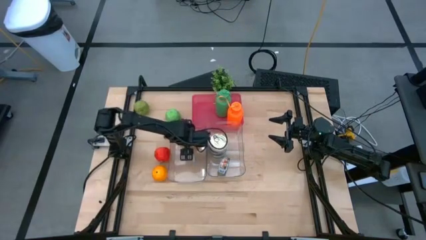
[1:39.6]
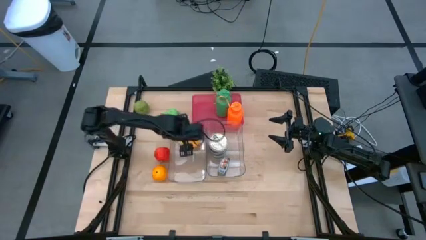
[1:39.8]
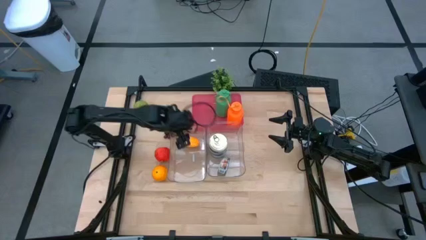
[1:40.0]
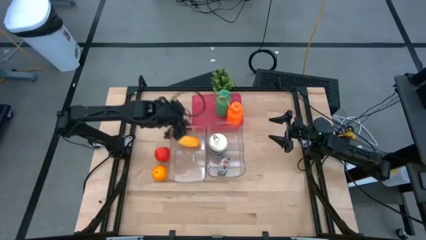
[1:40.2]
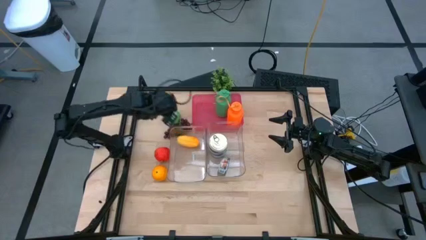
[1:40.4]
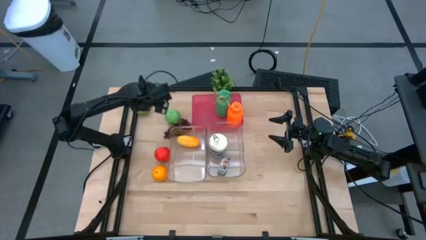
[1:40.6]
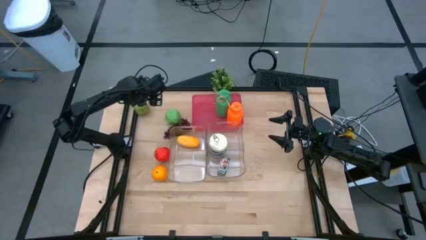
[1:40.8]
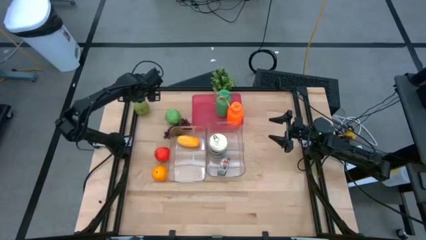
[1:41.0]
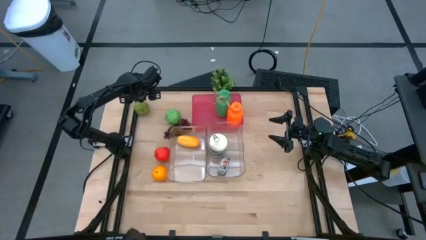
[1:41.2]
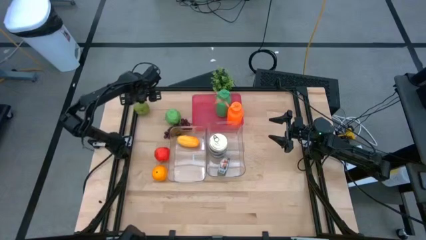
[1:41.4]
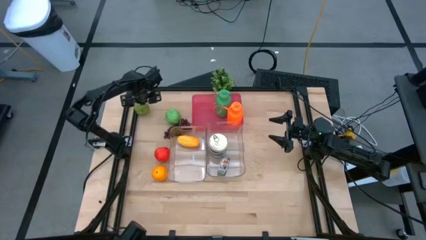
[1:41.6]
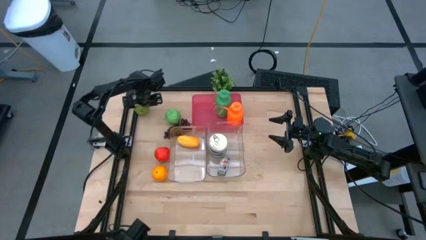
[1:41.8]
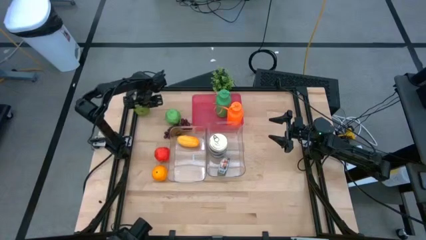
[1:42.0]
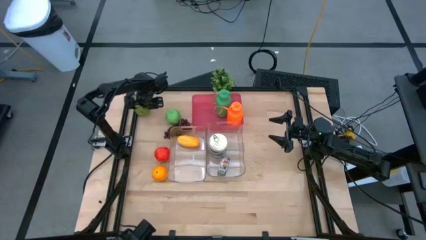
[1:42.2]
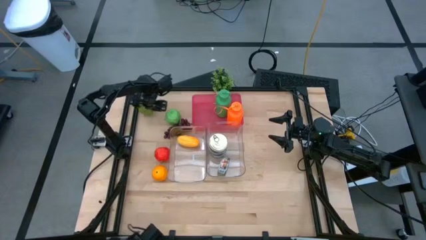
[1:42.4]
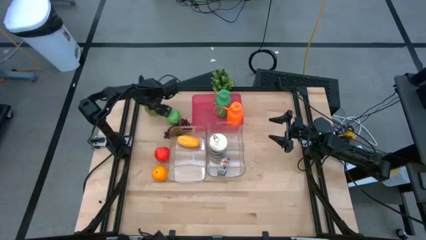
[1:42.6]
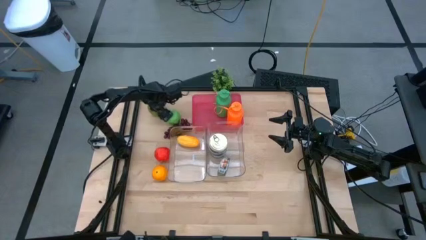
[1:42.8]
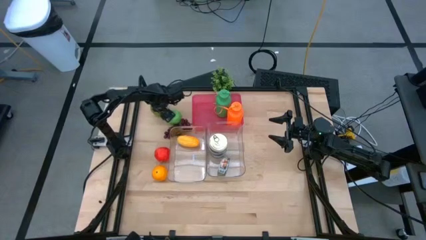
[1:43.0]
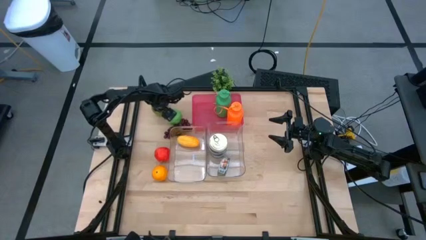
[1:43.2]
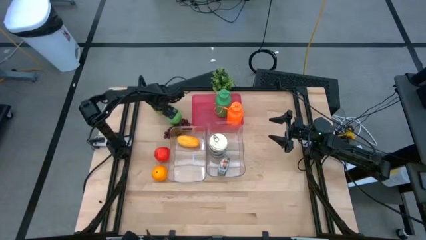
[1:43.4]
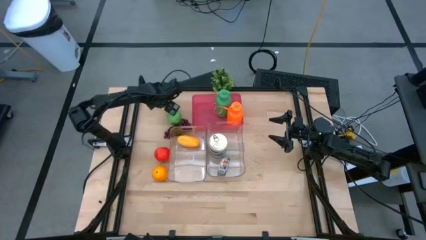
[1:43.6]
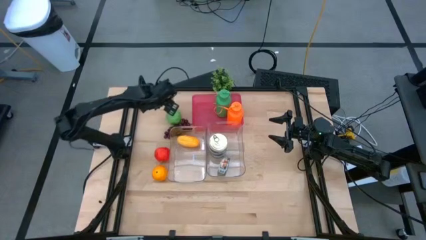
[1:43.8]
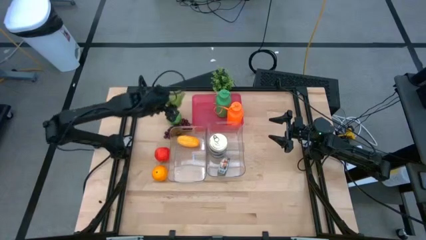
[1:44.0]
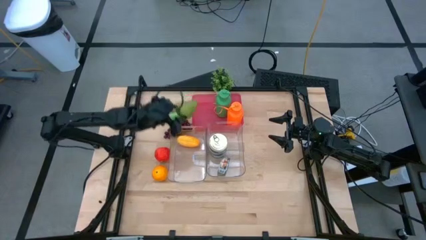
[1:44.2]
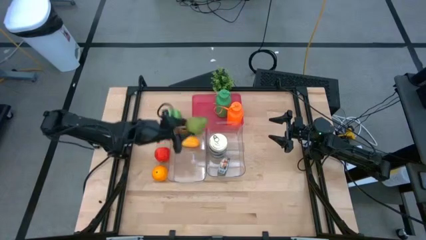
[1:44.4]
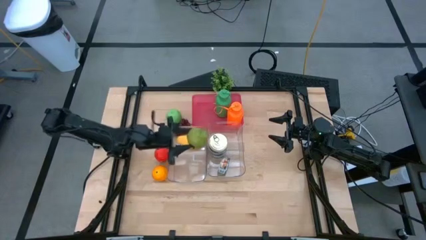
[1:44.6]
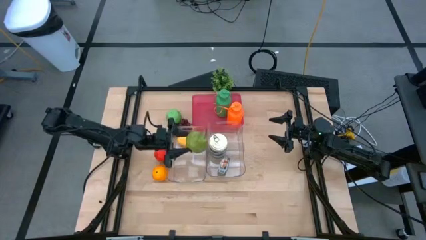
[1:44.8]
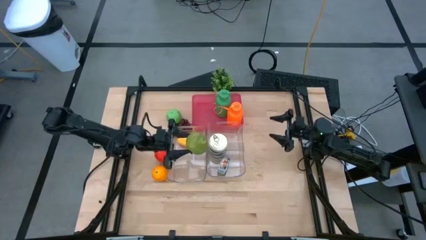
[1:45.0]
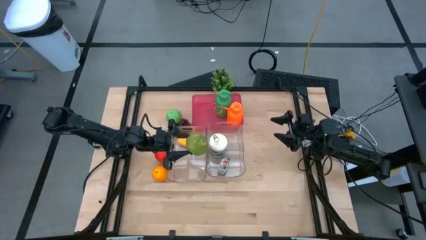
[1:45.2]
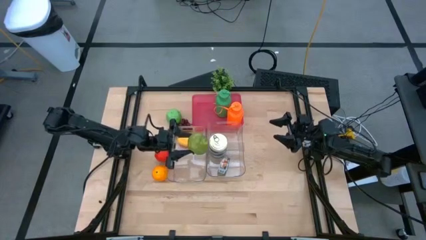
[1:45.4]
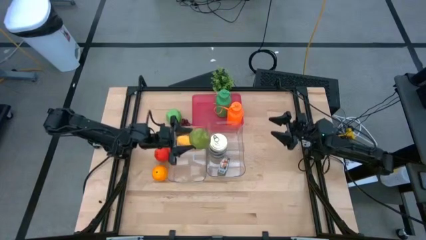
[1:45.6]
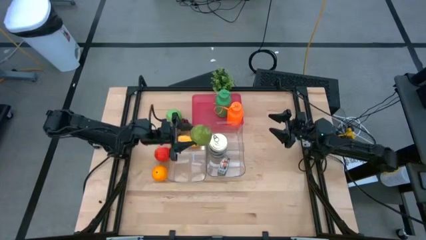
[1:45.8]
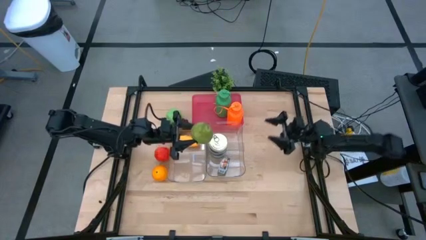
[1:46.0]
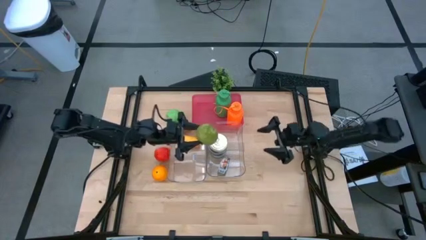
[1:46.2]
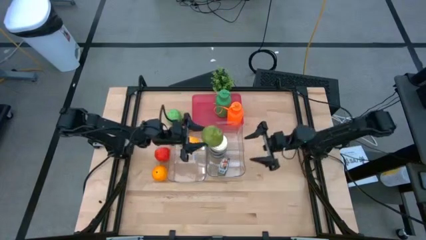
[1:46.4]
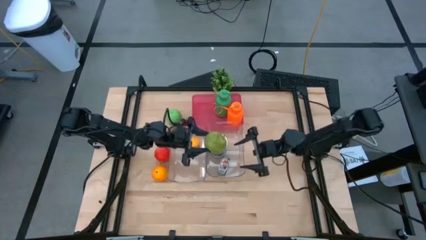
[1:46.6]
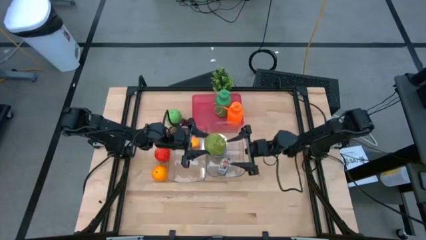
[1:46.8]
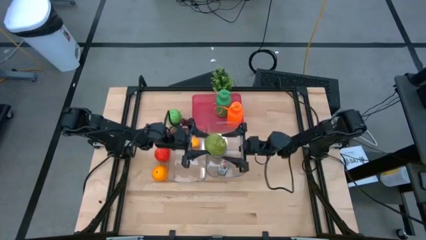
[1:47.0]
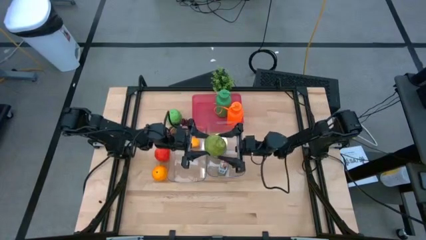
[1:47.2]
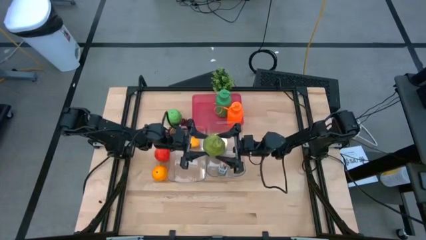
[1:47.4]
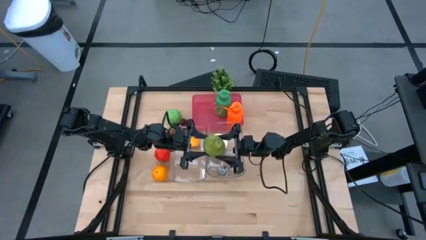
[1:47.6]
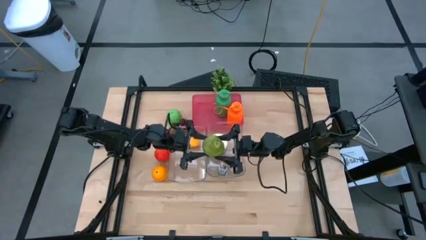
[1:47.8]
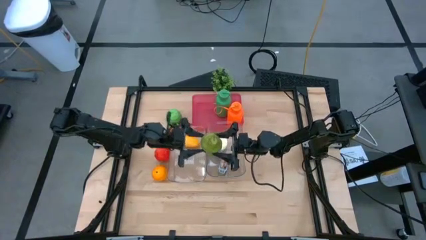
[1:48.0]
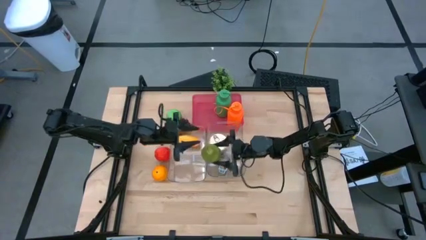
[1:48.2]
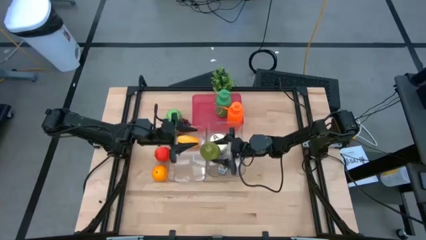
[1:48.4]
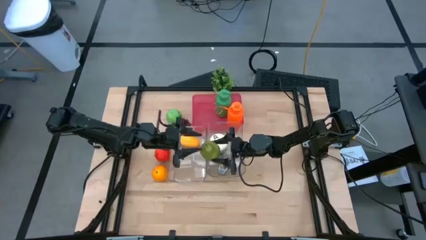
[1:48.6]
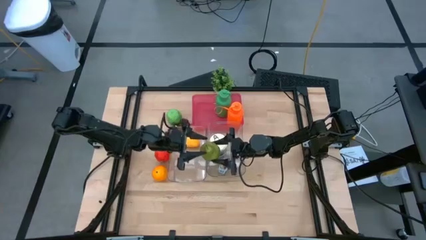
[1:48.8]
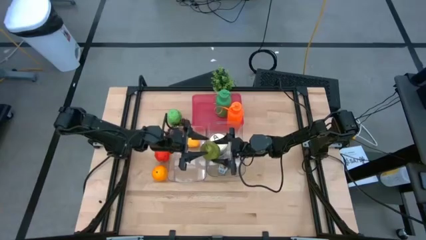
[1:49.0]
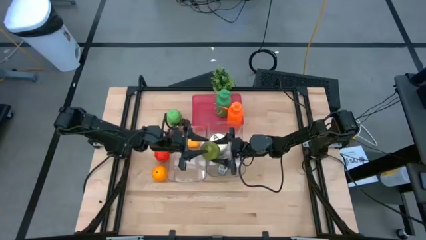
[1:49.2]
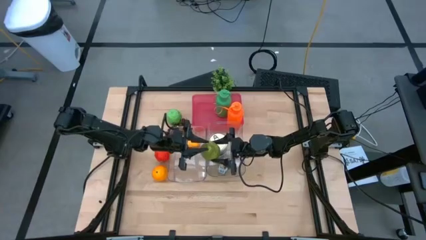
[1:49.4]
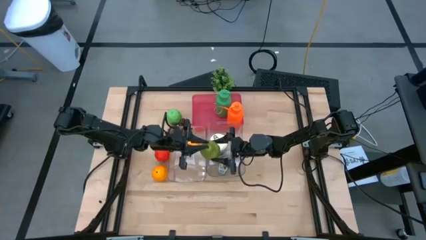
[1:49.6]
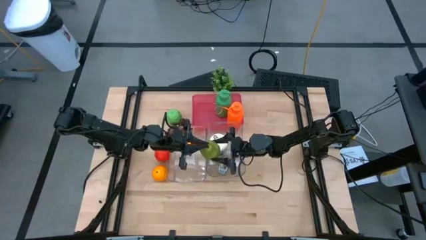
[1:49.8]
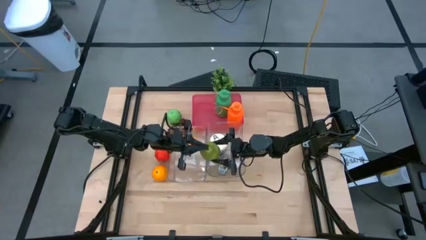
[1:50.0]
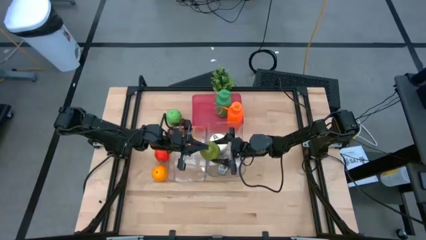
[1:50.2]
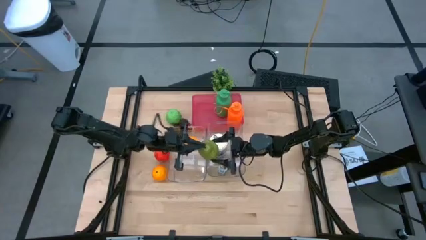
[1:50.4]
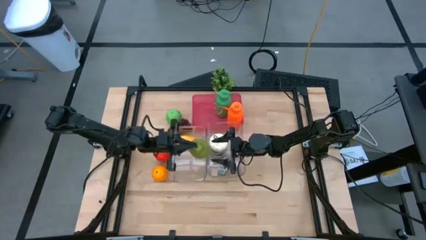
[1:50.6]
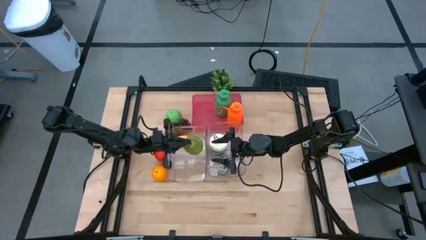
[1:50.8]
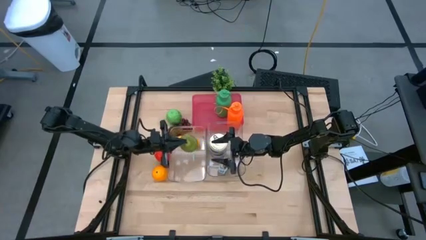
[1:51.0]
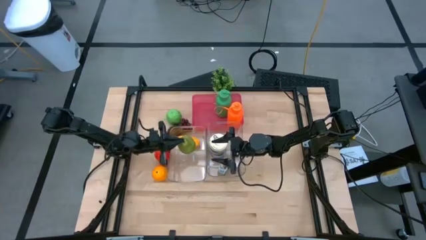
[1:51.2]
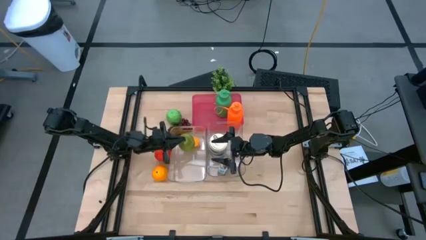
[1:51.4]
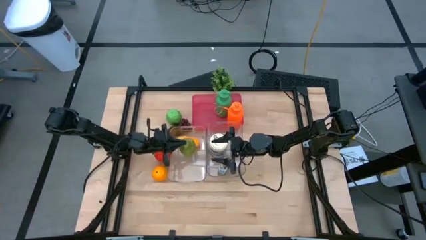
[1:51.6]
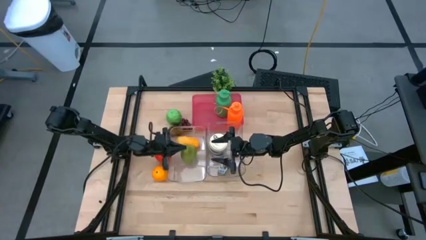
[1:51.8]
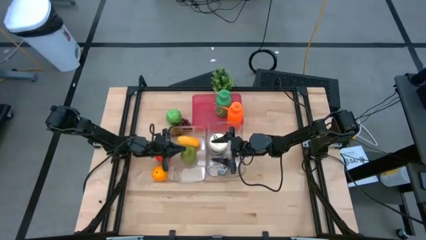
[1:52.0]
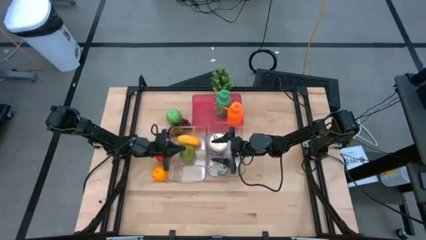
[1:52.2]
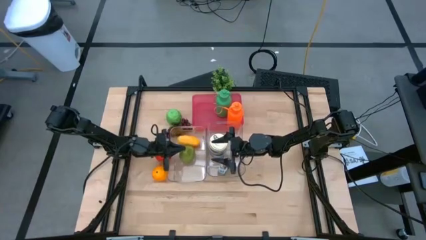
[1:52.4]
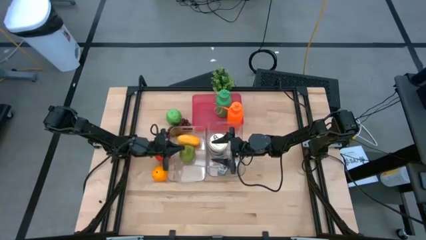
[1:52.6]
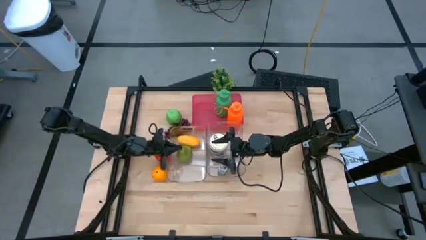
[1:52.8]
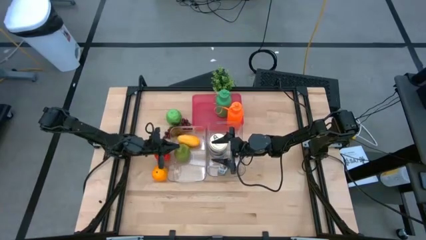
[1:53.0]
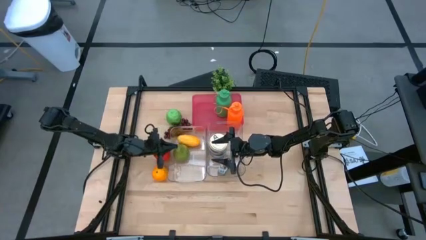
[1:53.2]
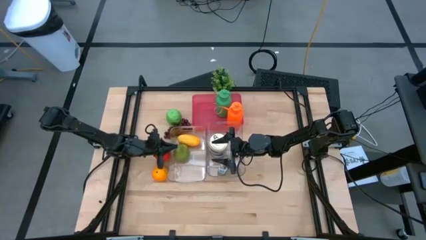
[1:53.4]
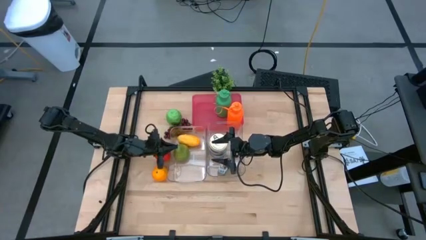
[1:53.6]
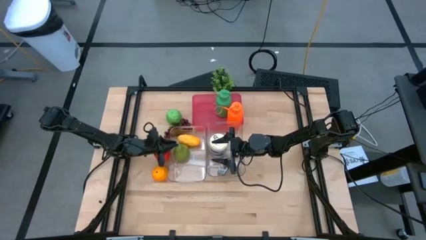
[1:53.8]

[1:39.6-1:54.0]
Task: Pick & Place Food Item
Put the green pear into the left transparent bin

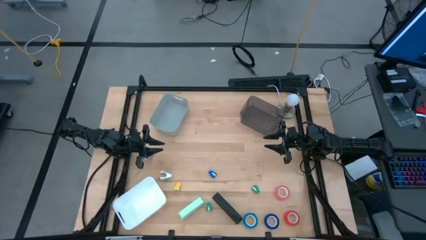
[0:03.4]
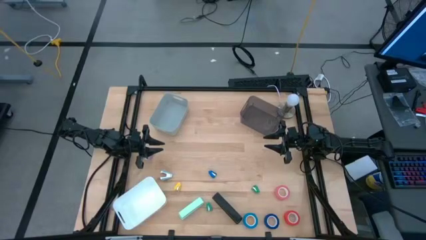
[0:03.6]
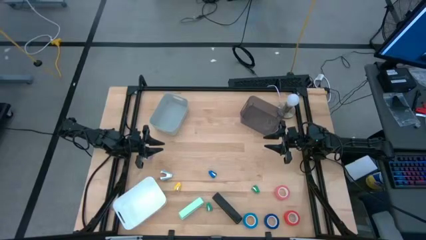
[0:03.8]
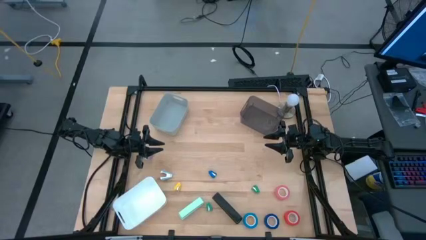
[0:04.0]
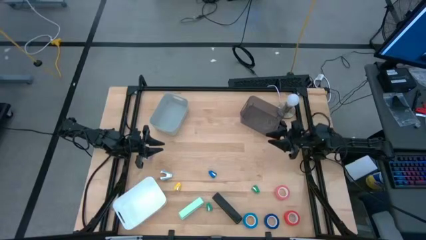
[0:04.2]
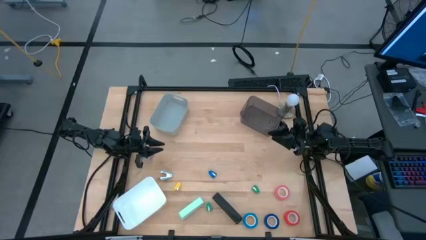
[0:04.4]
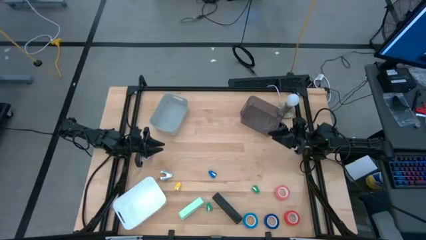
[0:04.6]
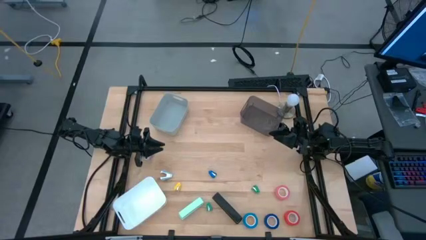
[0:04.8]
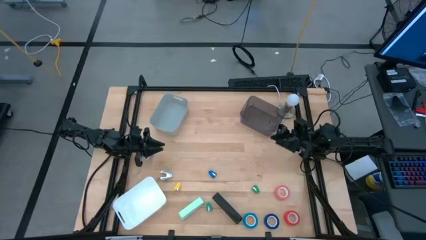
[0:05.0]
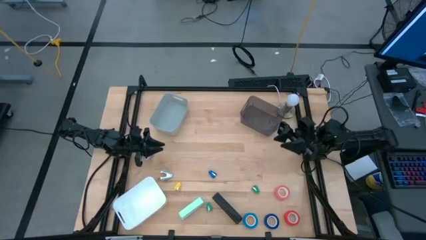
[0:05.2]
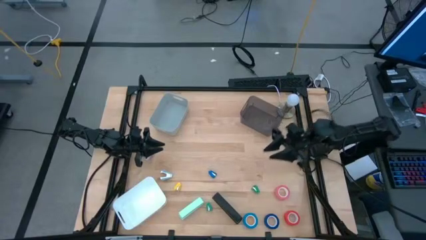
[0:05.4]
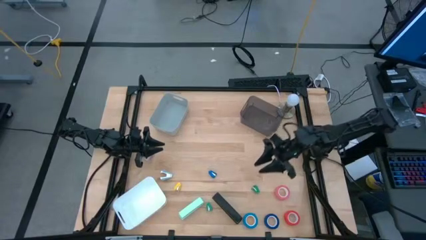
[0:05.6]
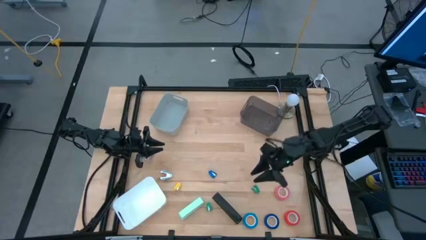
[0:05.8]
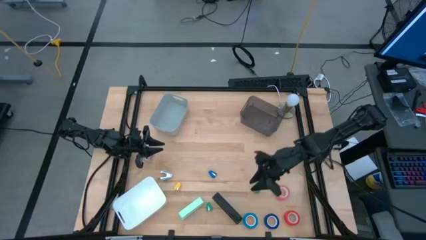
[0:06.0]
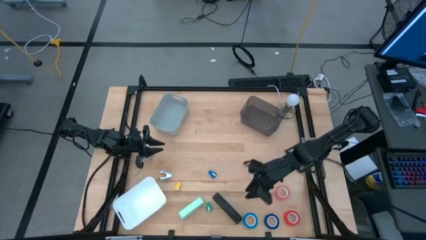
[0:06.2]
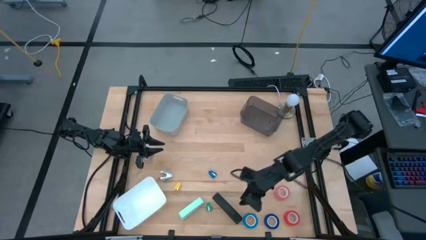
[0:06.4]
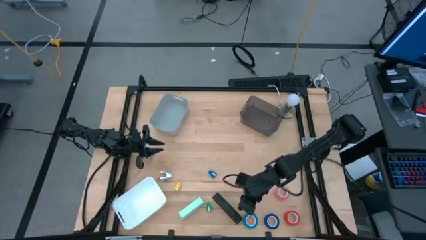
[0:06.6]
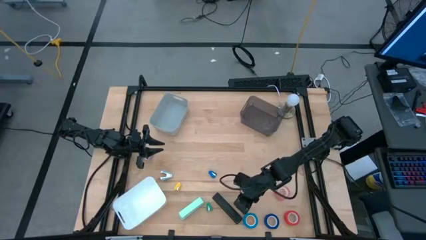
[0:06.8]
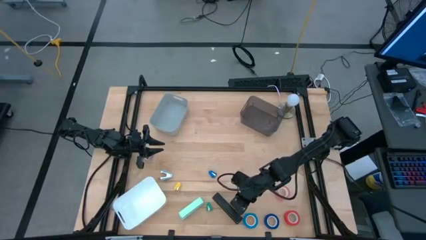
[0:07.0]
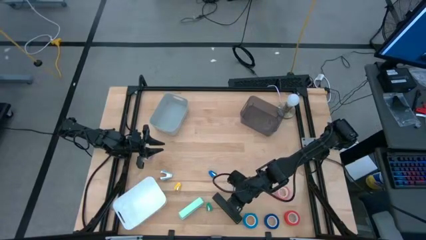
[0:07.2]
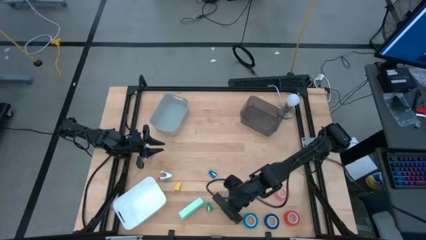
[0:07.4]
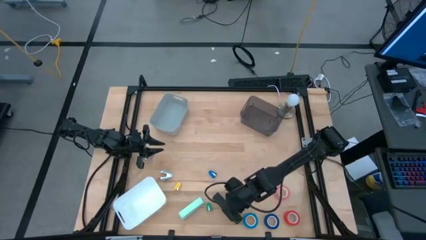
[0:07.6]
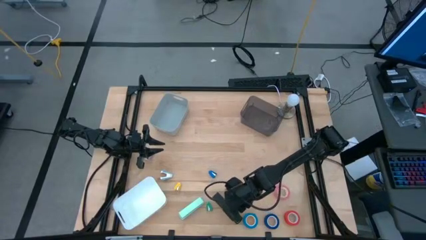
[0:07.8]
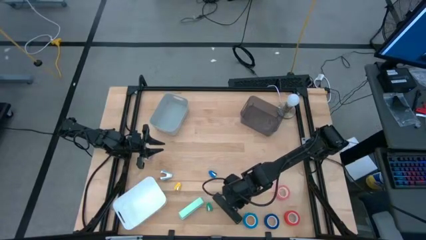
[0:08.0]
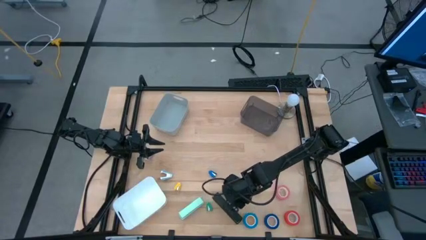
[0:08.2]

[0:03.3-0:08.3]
Task: Pick and place Stapler, Stapler remover, tape
Put the big black stapler into the gray bin
